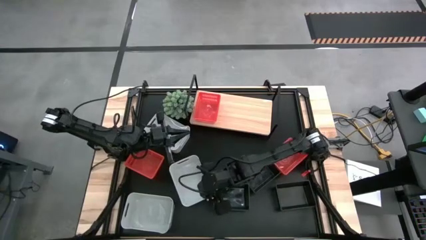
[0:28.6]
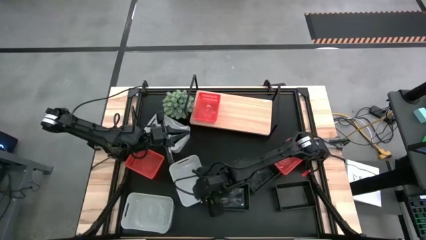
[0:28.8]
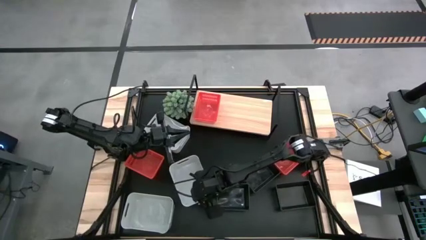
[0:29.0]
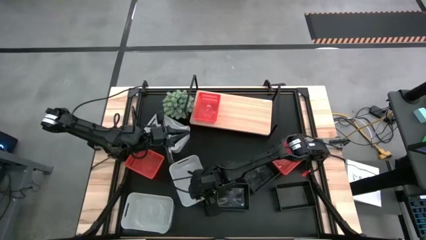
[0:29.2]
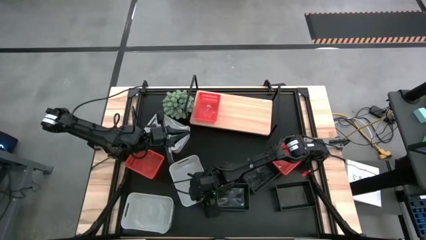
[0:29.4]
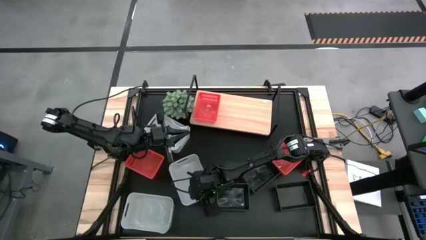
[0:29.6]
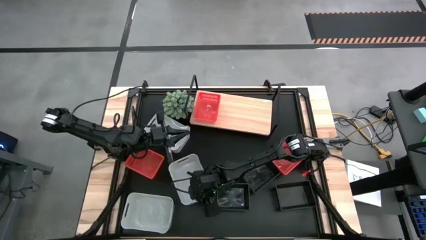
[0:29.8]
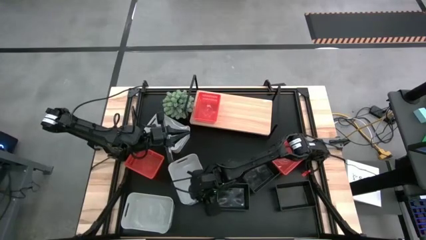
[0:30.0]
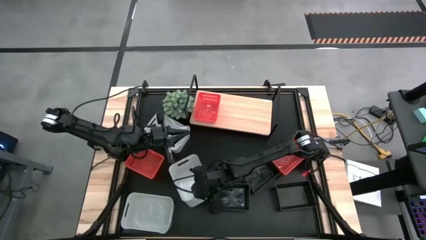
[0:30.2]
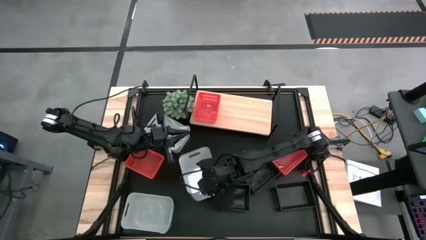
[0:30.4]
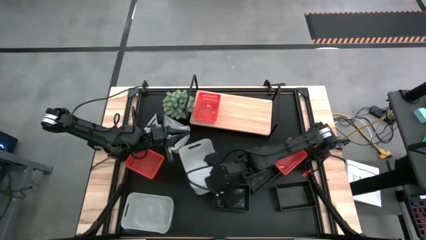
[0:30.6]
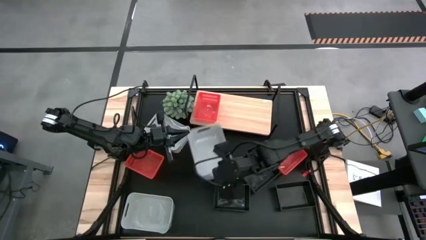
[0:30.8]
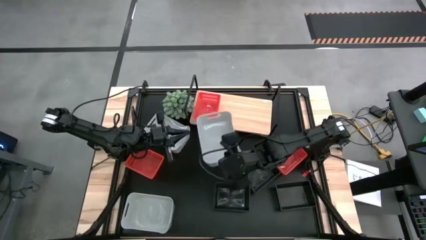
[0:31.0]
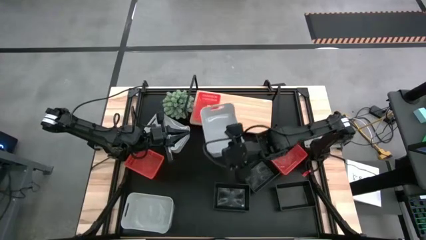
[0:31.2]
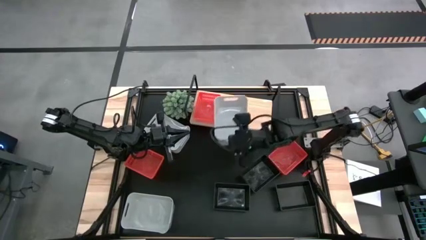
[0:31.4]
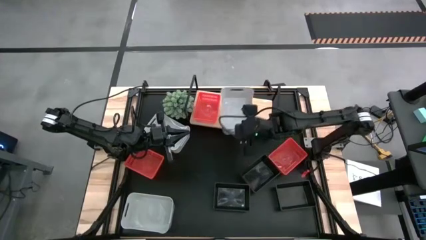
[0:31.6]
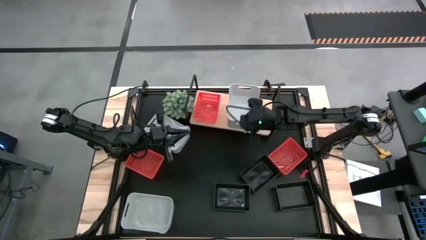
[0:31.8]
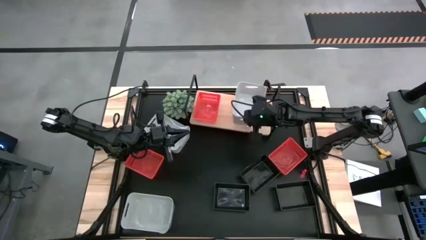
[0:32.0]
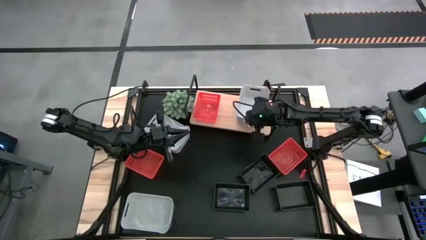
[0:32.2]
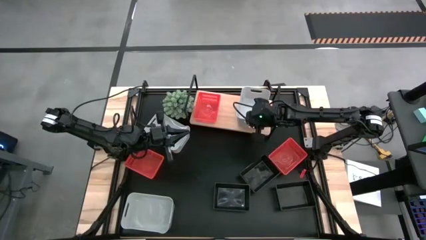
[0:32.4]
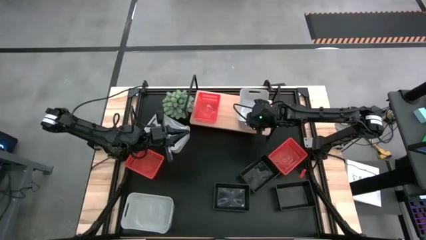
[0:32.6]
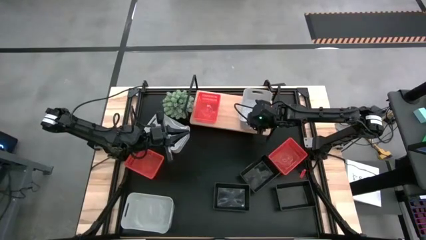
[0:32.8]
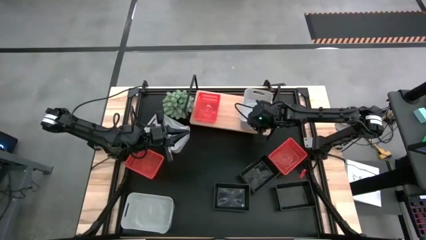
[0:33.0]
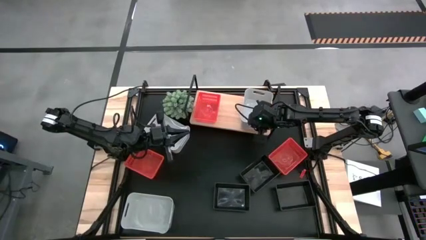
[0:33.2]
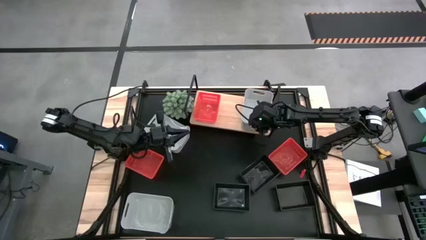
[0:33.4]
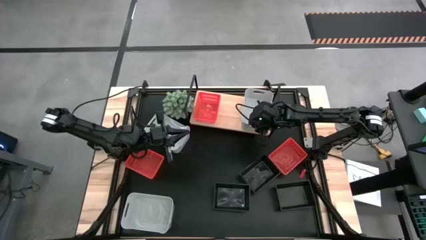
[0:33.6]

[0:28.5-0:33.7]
Task: Stack baskets on shelf by color
Put the middle white bin on the shelf

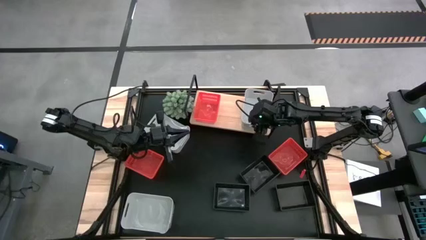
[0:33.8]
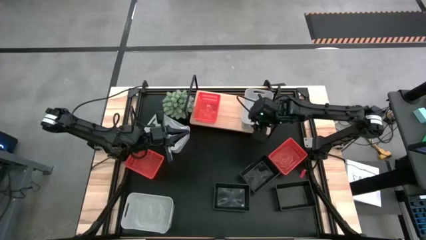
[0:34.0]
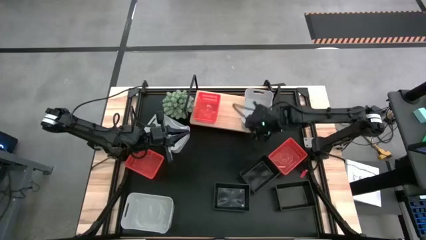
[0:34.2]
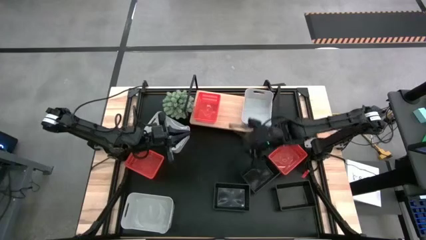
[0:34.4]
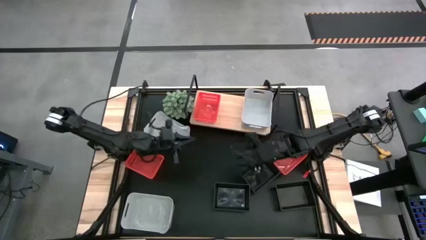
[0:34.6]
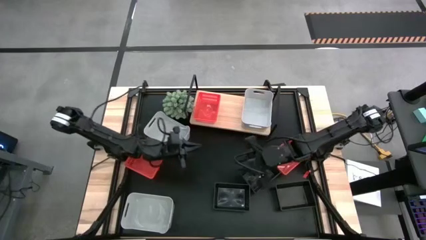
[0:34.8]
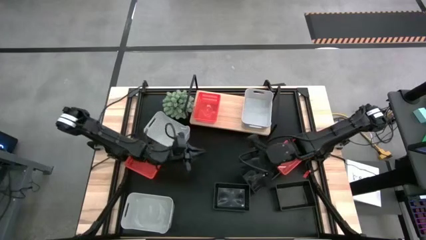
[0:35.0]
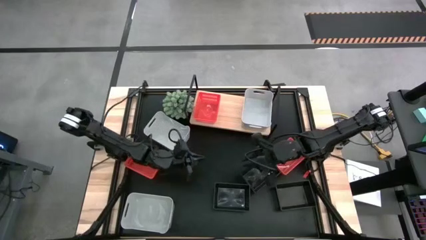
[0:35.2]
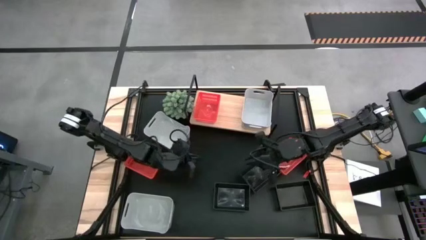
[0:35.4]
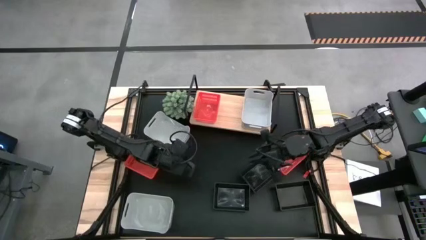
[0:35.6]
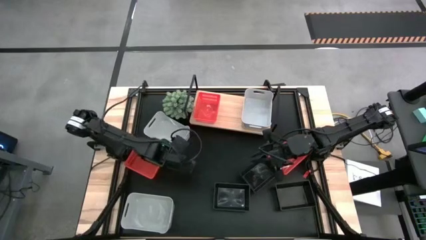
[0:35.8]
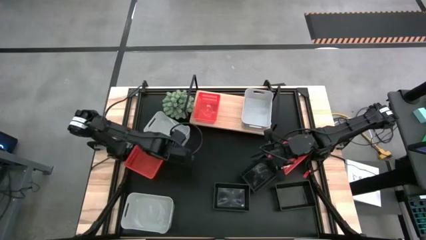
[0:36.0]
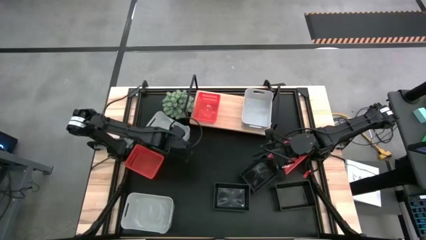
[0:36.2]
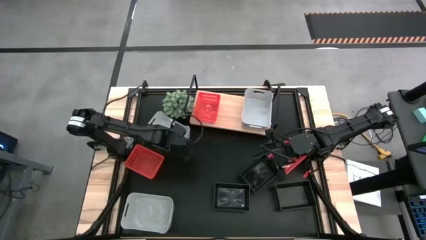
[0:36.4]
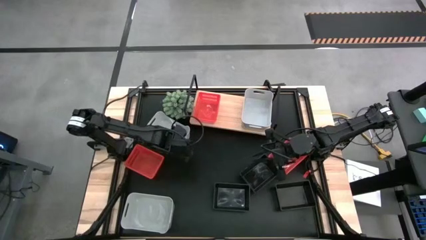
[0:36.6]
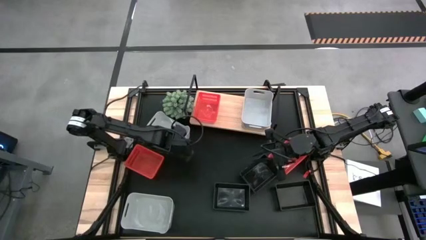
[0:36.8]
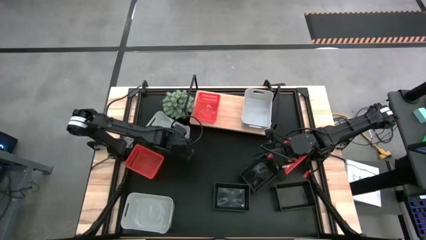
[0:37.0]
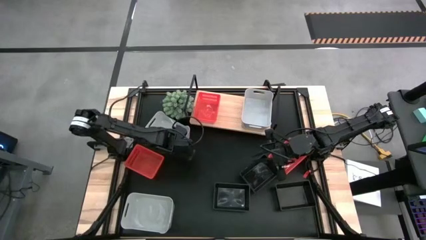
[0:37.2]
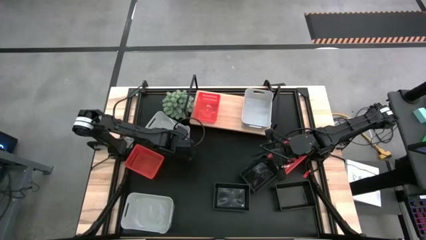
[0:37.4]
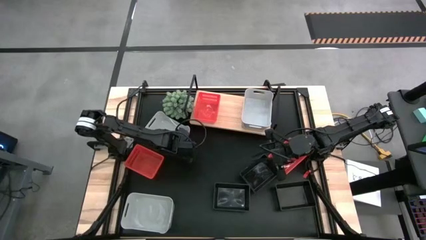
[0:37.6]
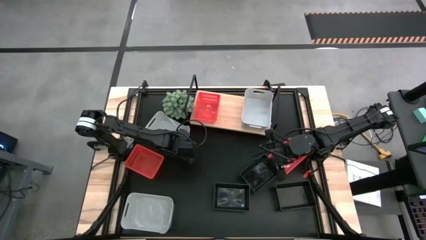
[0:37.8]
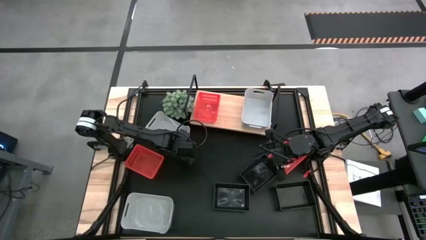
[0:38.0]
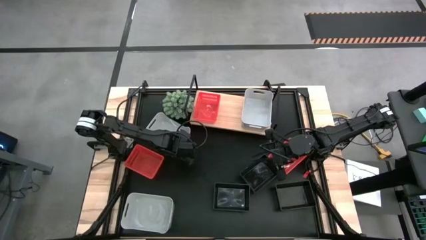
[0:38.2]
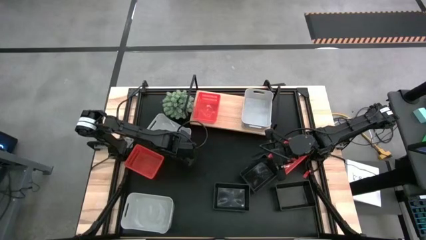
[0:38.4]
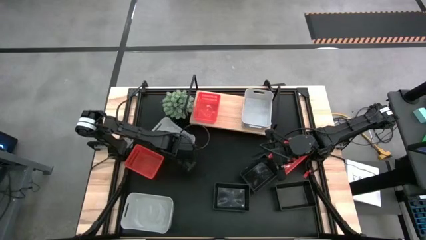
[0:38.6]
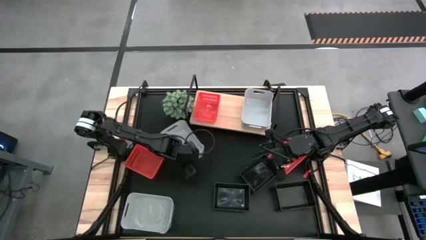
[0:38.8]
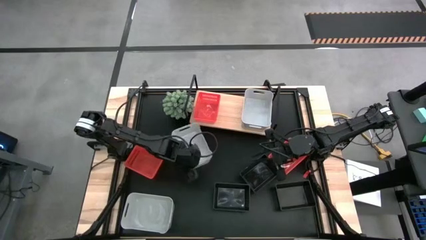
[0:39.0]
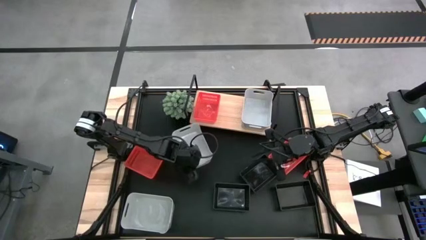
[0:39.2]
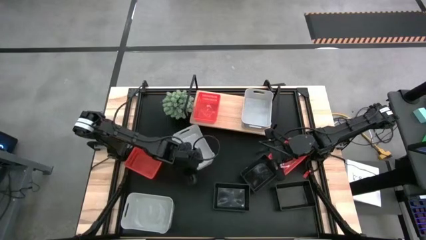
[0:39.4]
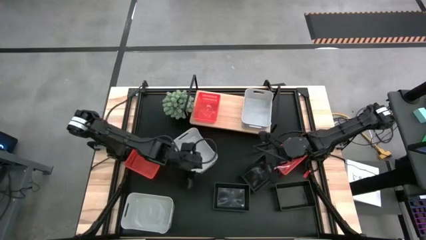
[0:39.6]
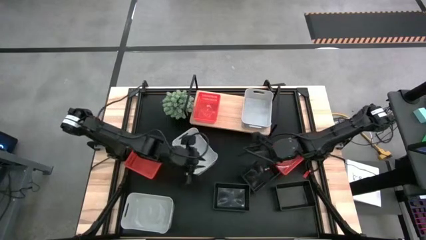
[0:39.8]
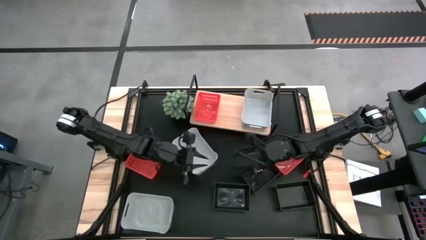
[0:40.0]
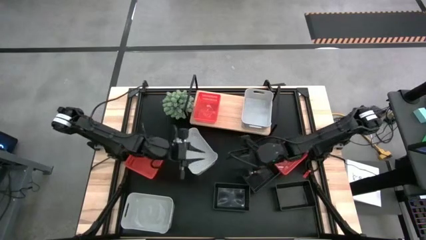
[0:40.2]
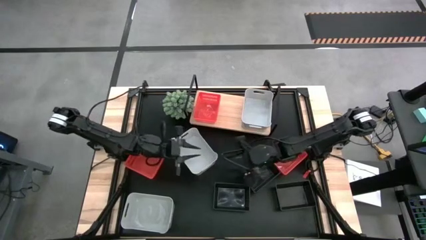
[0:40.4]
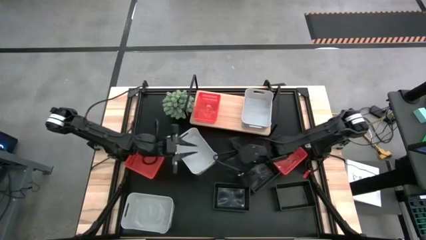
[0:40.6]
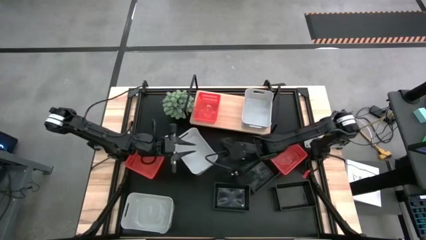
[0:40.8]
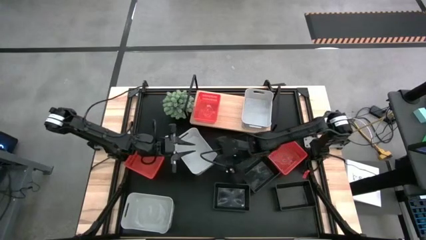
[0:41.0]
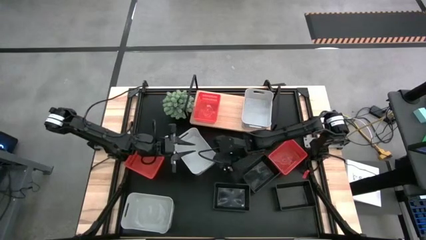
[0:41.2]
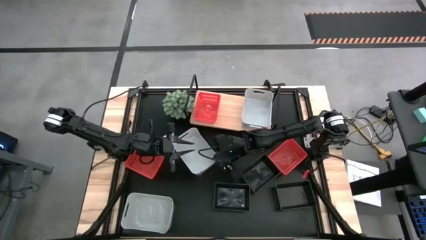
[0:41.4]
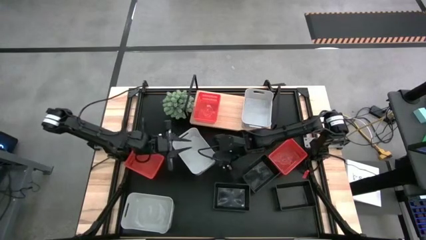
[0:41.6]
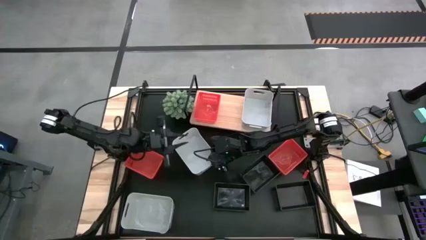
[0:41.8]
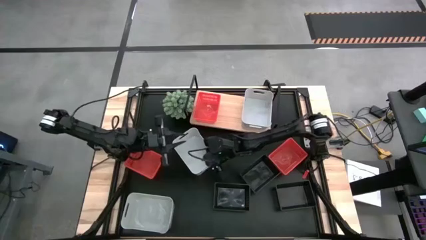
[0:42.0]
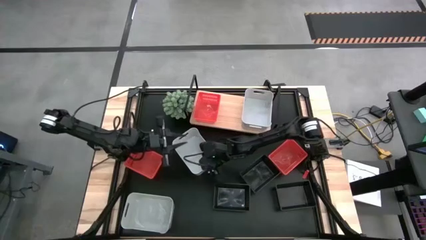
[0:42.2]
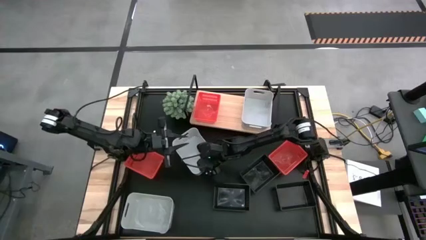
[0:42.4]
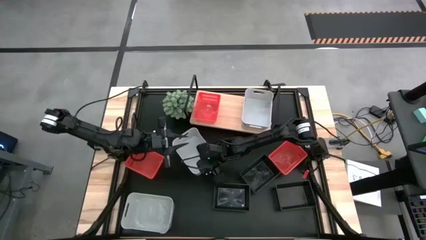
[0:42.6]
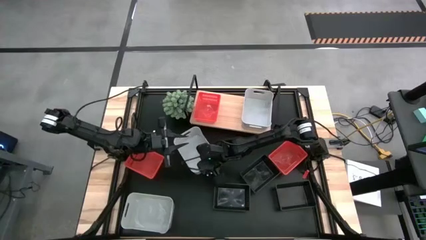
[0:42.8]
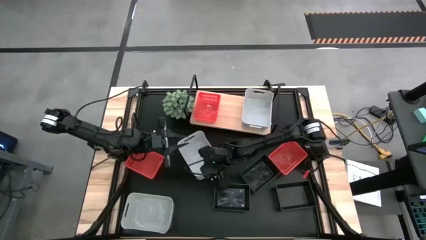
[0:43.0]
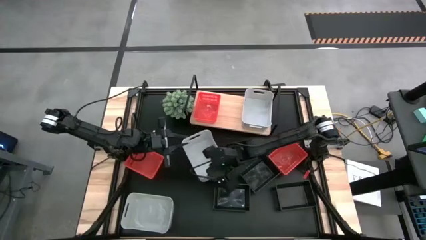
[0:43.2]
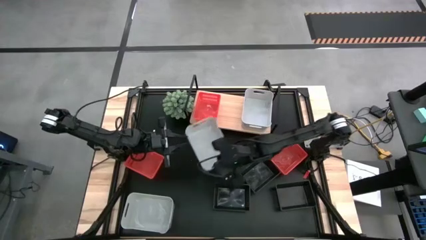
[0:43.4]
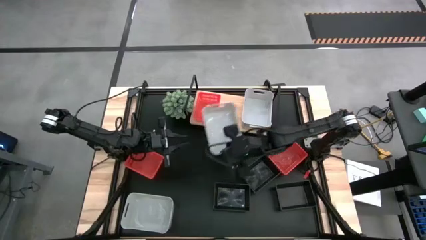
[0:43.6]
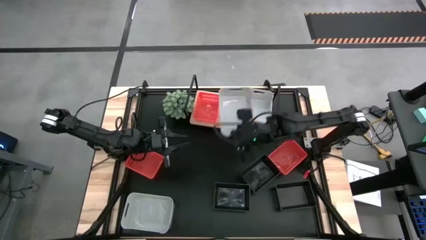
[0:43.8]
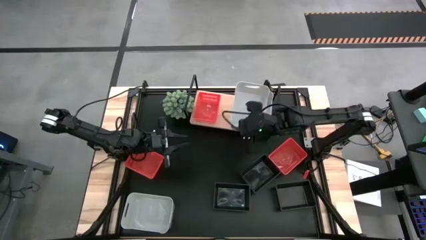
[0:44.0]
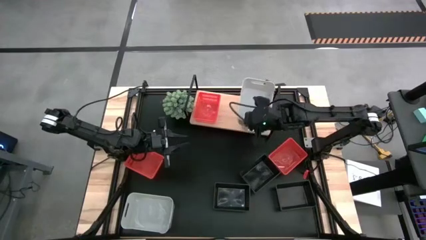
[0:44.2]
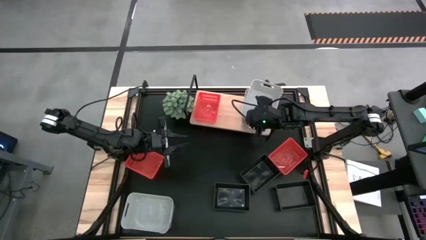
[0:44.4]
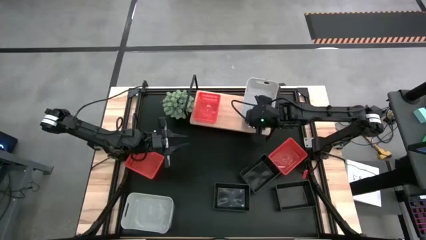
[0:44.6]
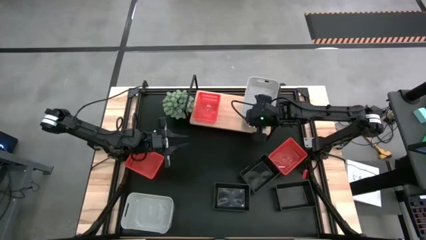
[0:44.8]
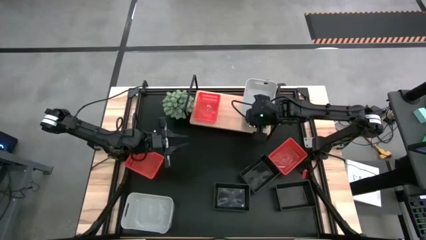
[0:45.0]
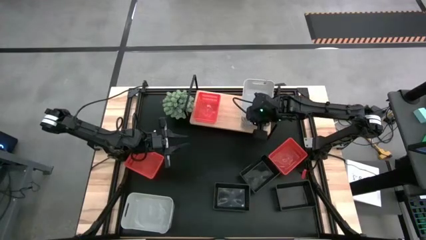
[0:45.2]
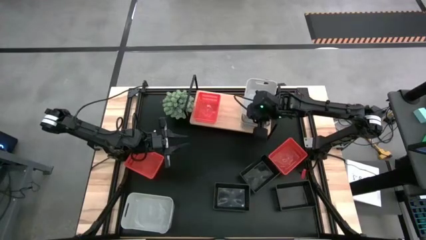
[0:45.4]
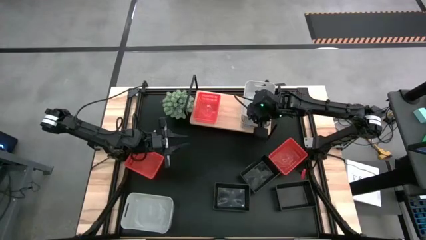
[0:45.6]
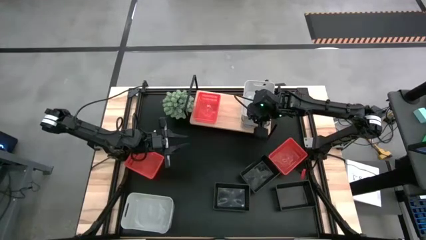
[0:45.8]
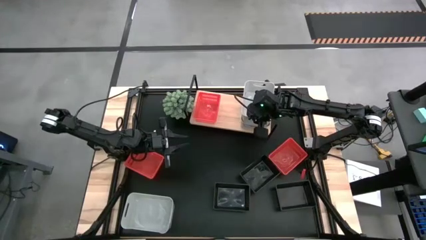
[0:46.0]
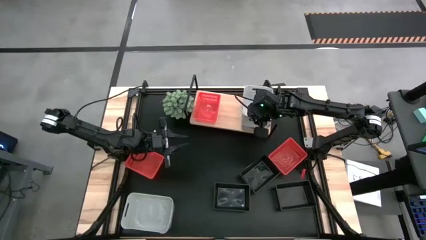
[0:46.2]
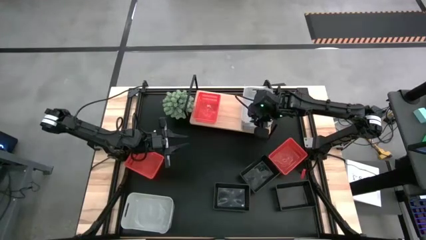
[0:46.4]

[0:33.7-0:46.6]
Stack the top white bin on top of the white bin on the shelf
